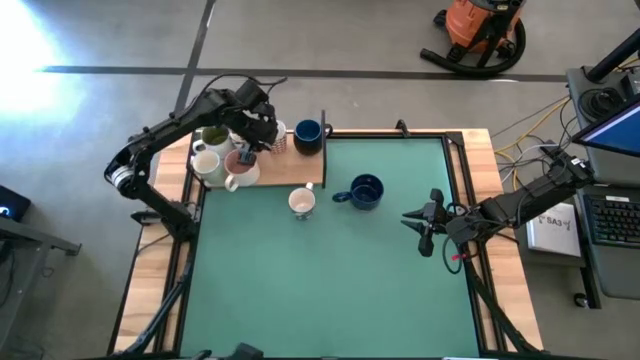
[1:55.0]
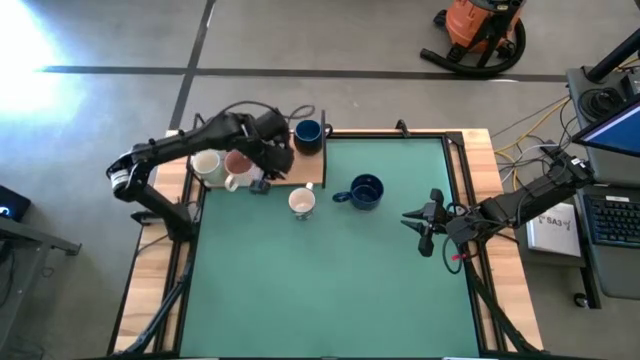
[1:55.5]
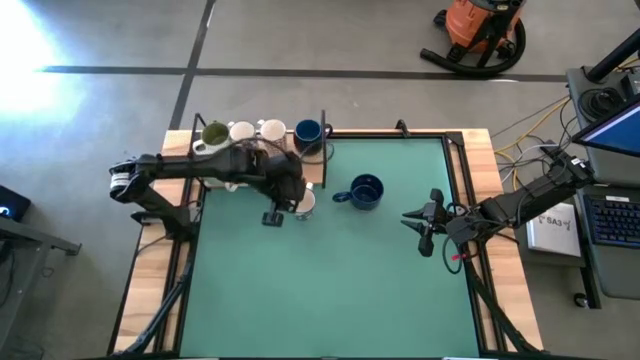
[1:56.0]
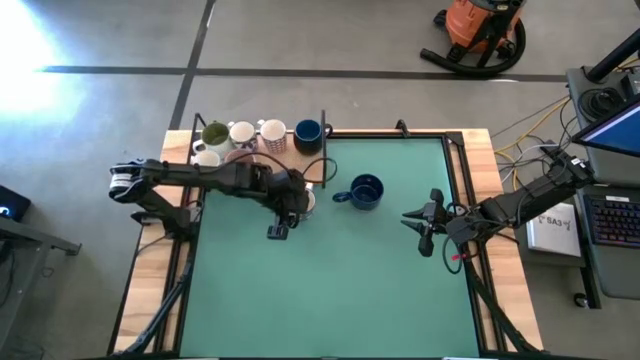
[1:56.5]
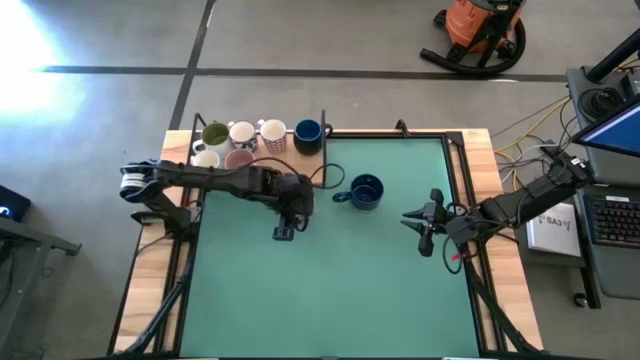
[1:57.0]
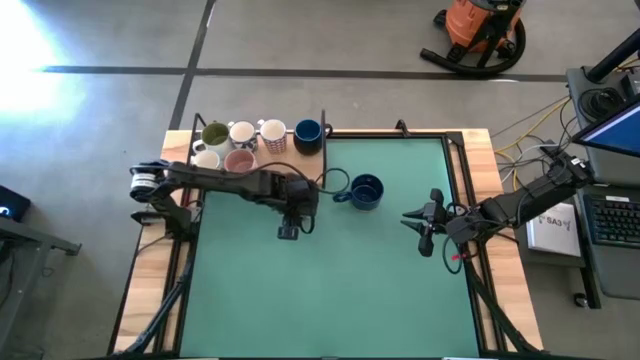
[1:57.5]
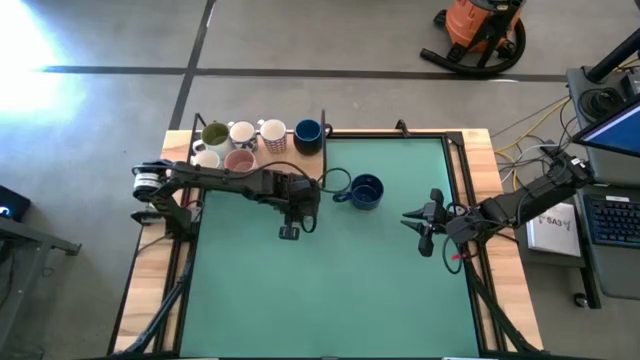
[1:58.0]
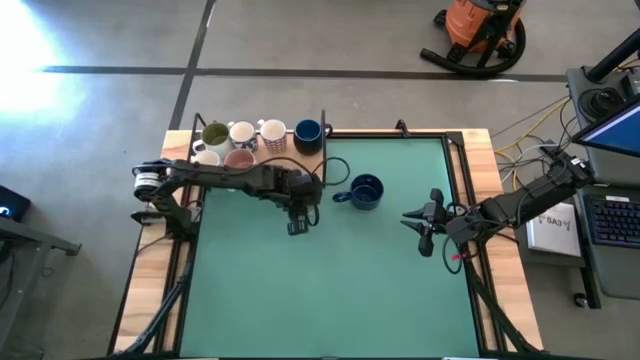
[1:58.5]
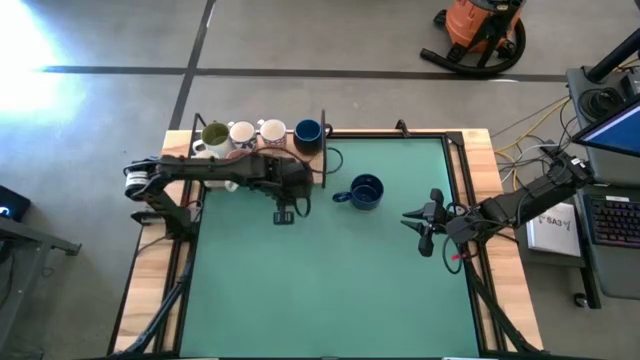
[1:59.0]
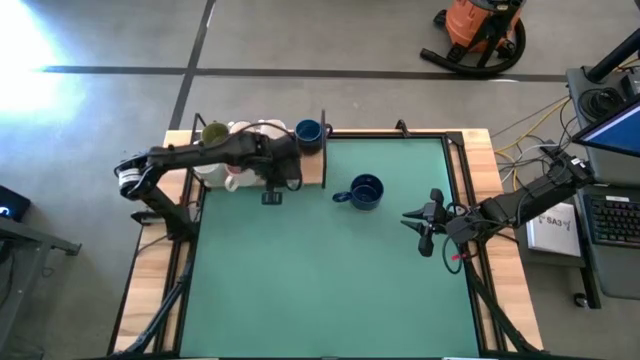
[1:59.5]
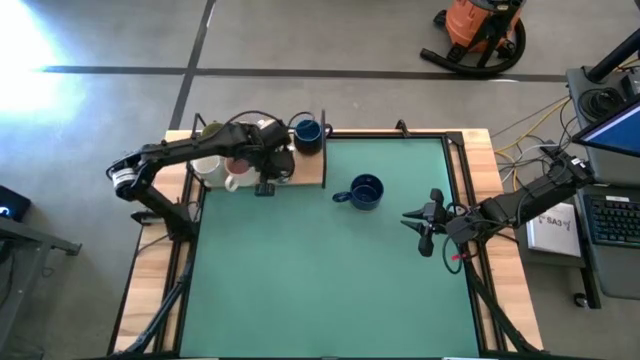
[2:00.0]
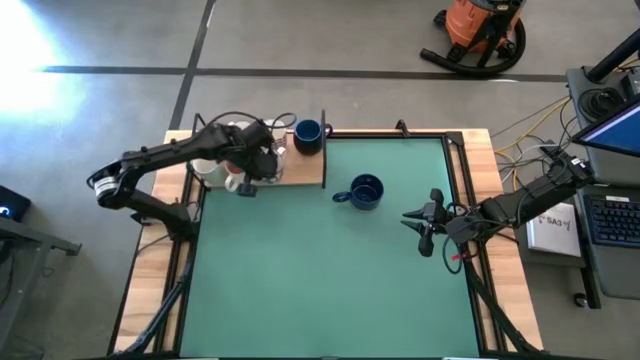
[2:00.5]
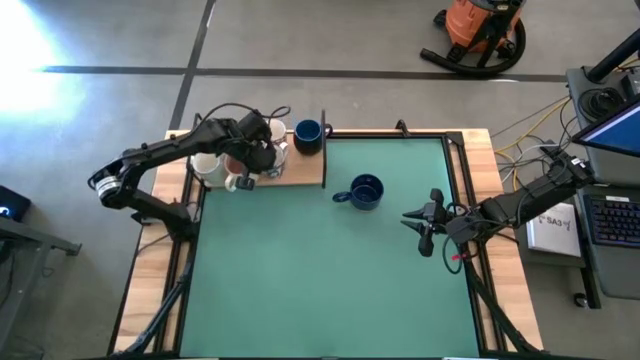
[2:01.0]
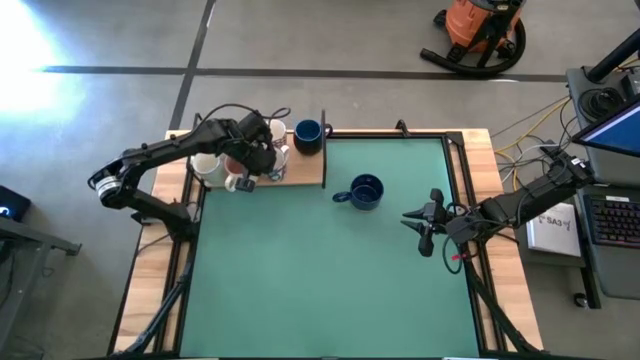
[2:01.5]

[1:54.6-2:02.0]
Task: Place coffee mugs
Put the blue patterned mug on the shelf

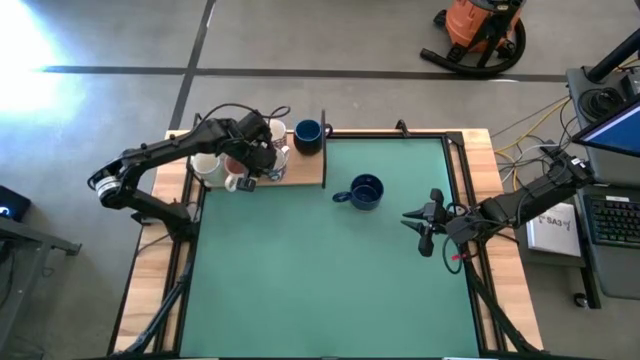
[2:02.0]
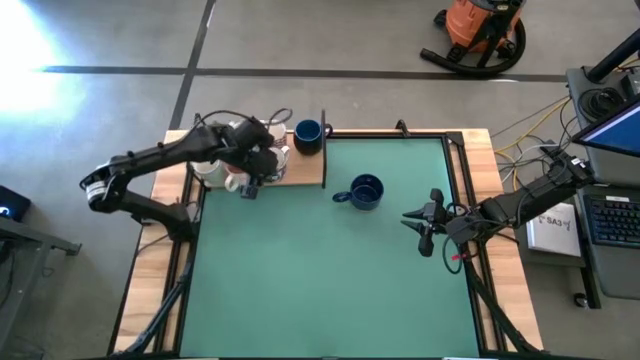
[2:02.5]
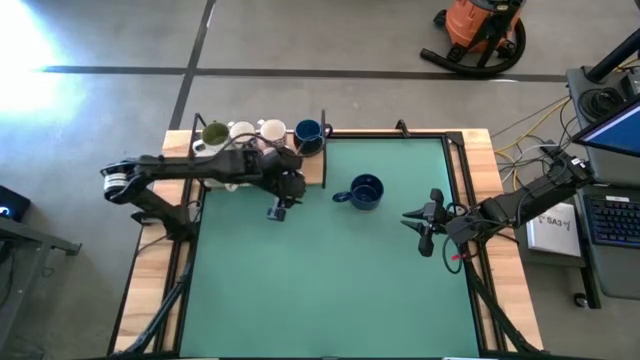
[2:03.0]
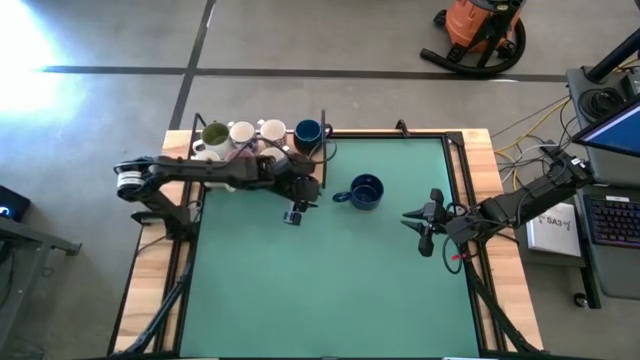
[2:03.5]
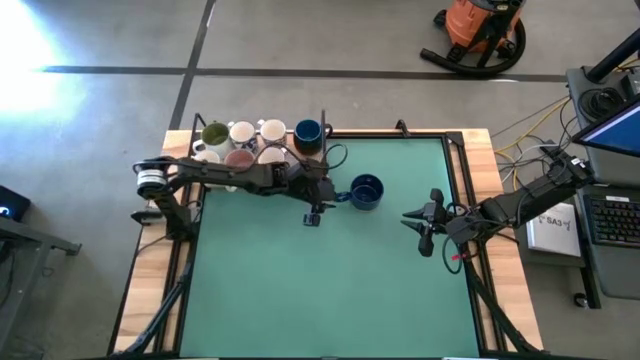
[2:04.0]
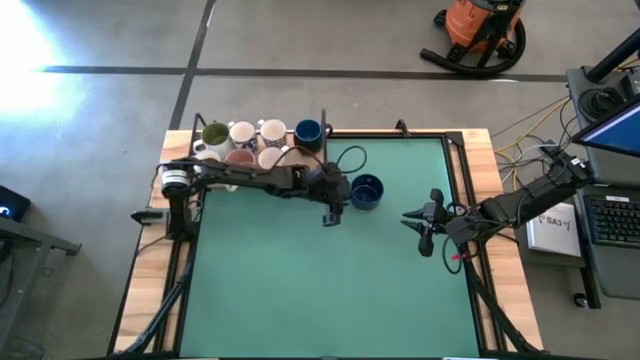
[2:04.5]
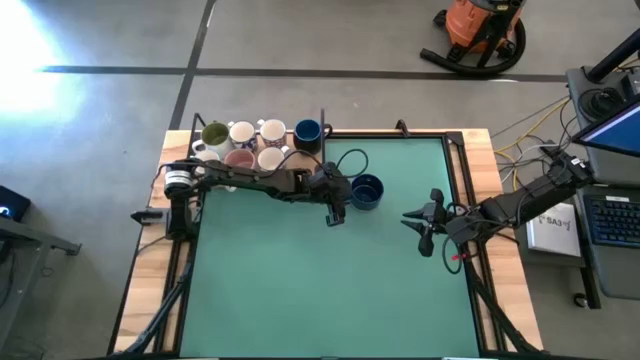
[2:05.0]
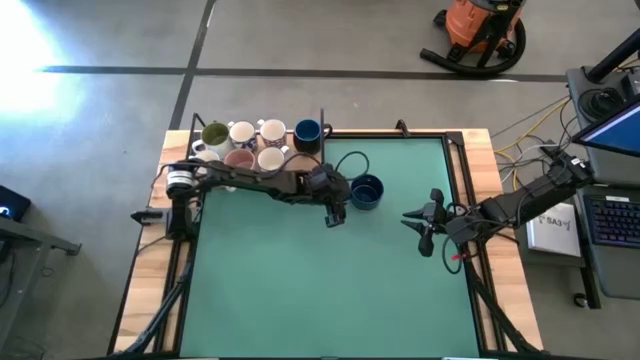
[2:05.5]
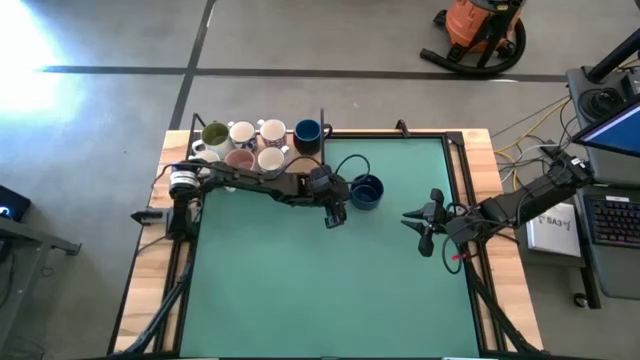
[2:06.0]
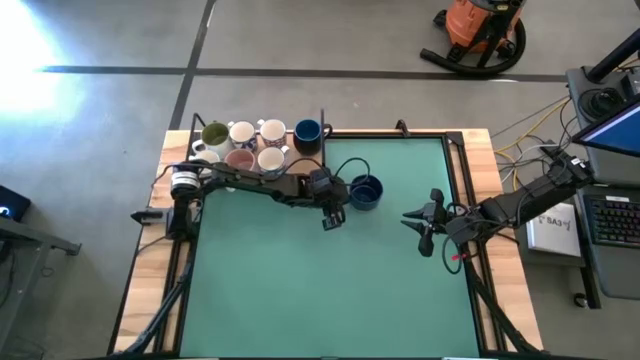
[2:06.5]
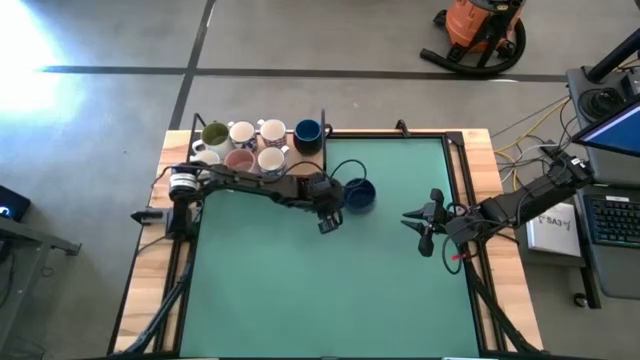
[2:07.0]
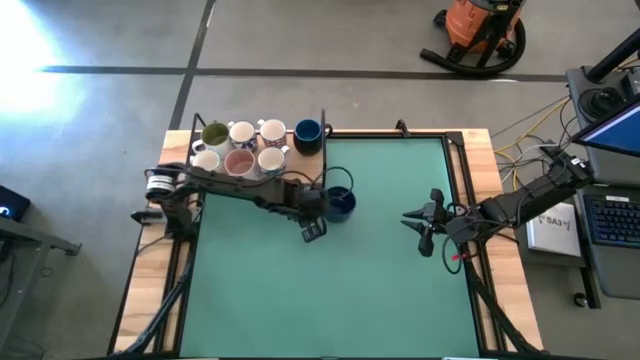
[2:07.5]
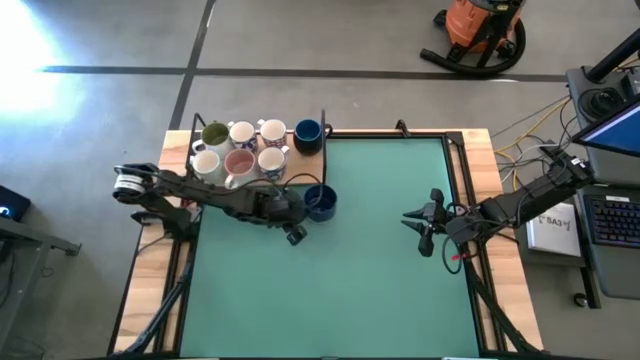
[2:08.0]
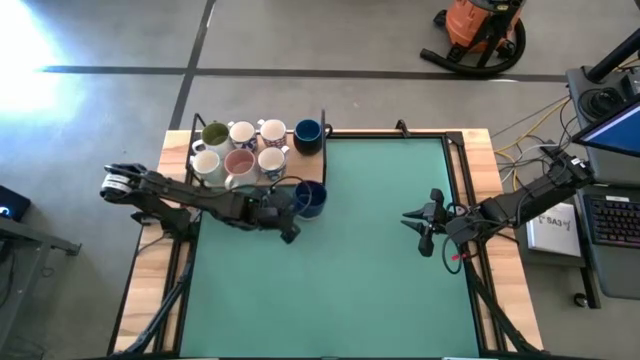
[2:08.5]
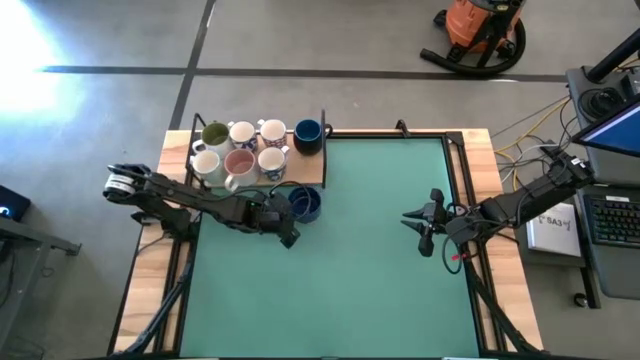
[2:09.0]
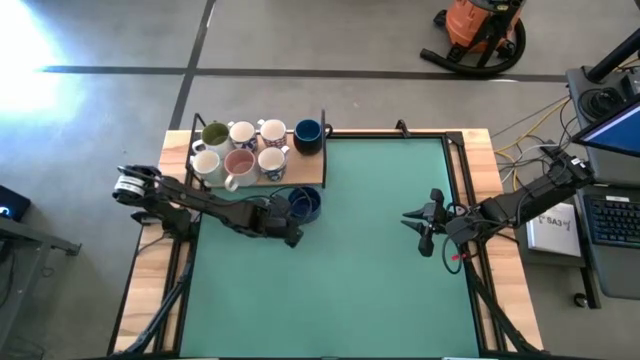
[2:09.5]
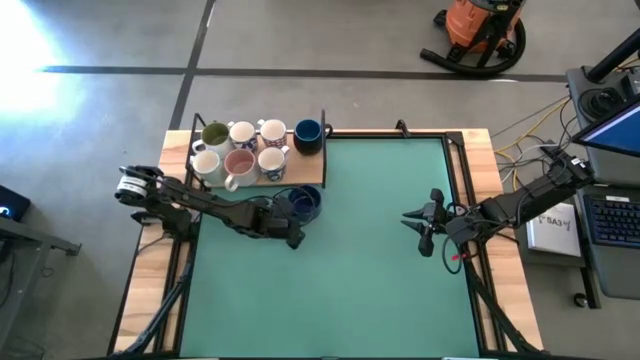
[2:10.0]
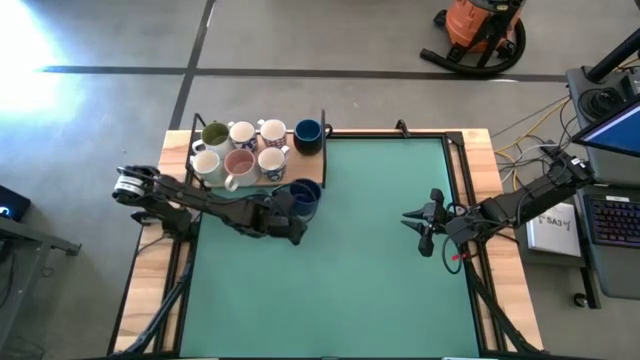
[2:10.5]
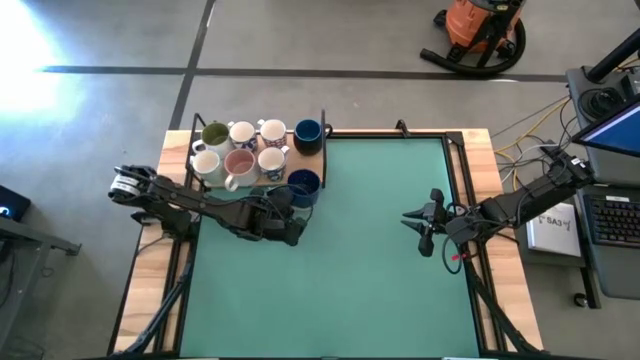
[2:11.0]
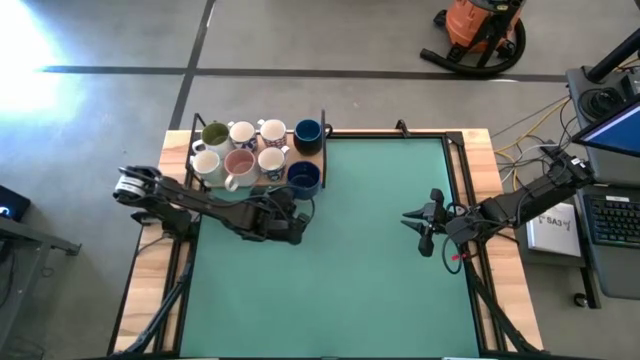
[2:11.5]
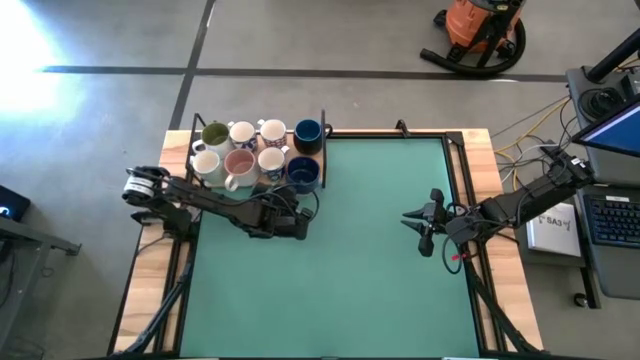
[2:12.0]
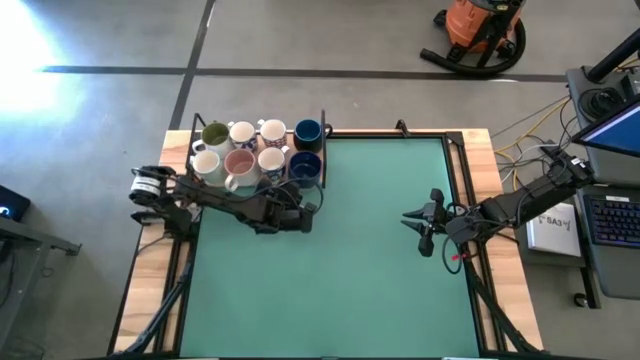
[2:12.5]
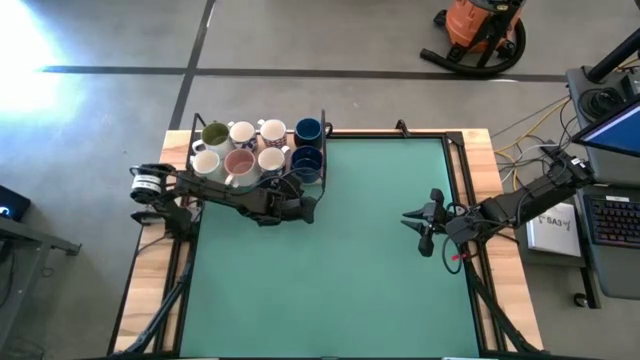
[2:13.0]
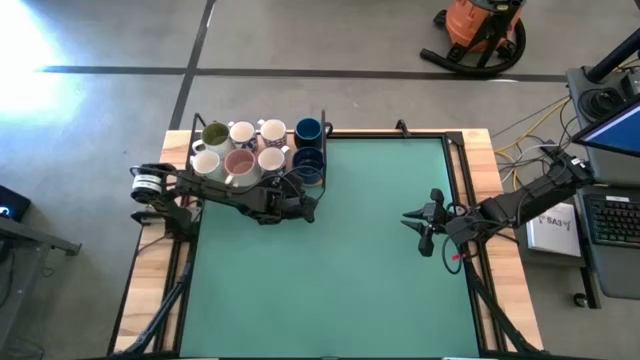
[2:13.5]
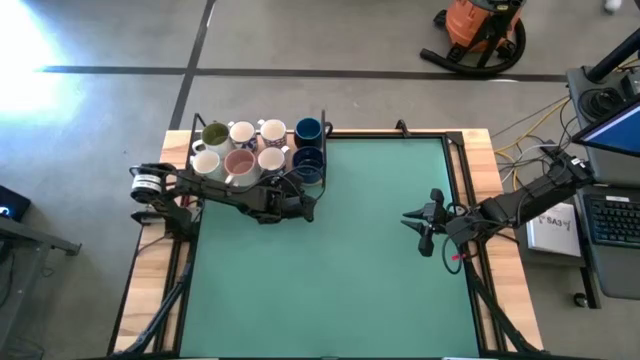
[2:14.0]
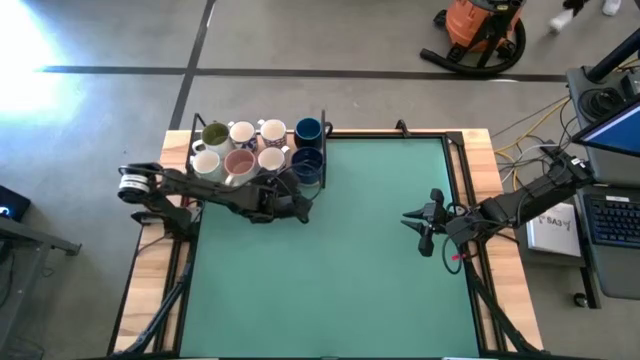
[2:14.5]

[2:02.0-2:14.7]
Put the blue mug on the shelf

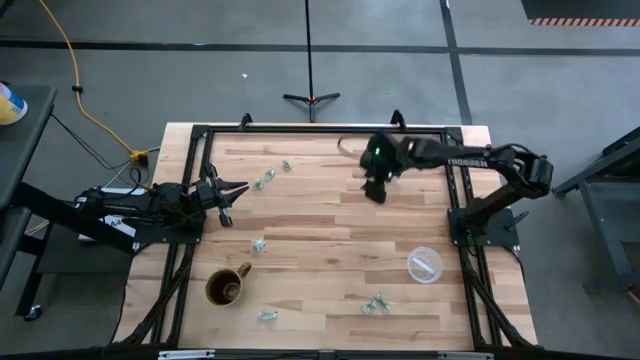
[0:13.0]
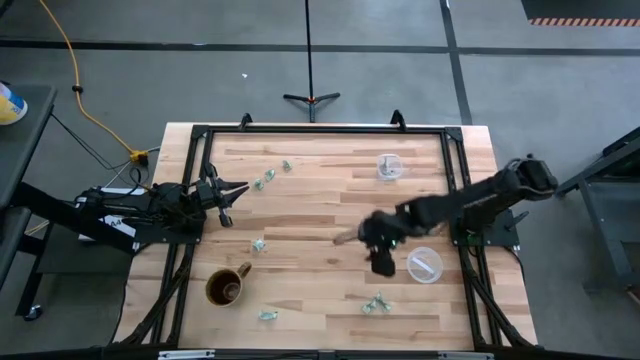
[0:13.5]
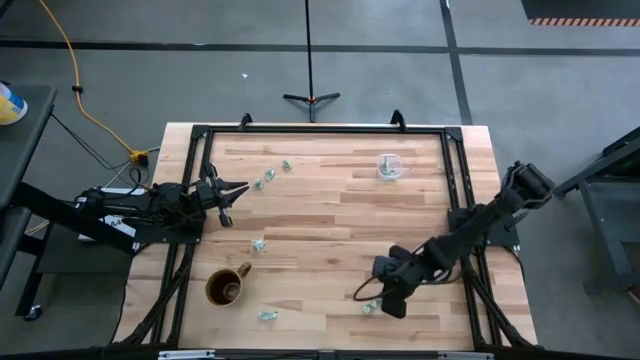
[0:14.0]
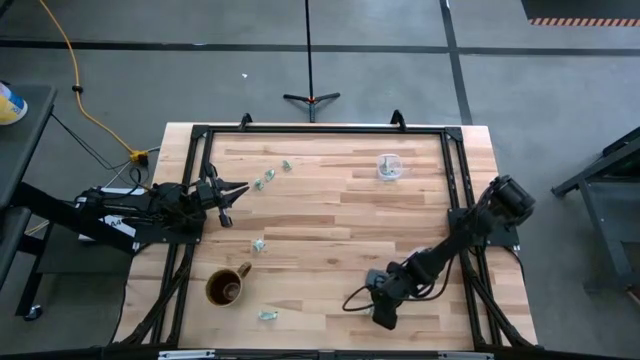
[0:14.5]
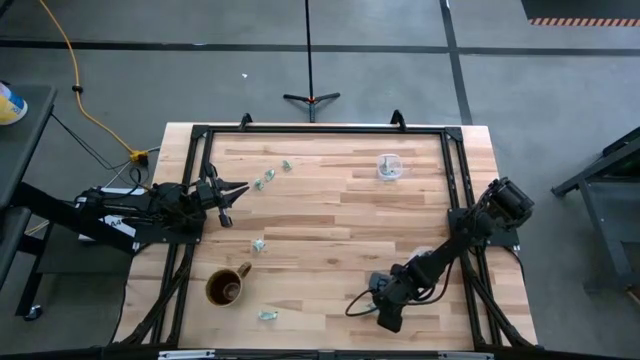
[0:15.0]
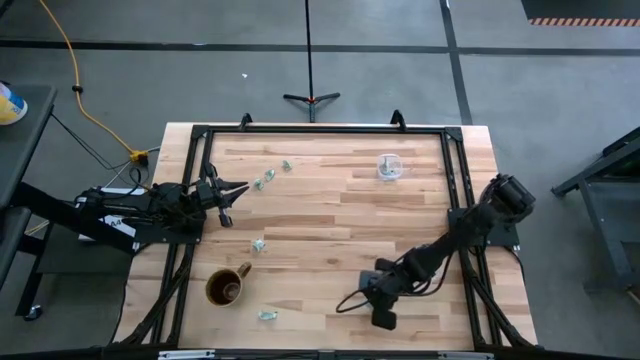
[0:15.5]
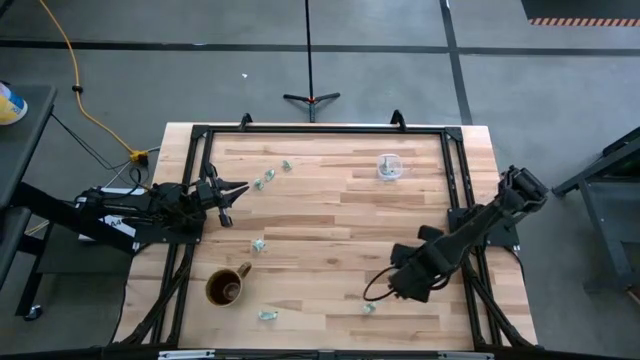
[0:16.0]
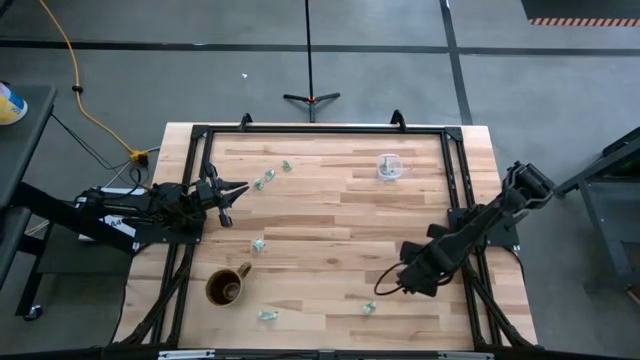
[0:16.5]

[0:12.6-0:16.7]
Task: Pick and place items into bin
Put the green stevia packet into the bottom transparent bin
